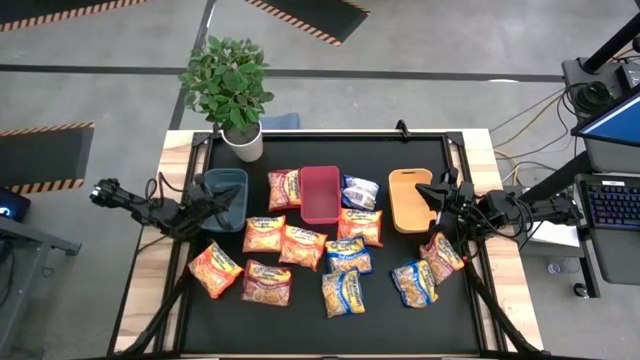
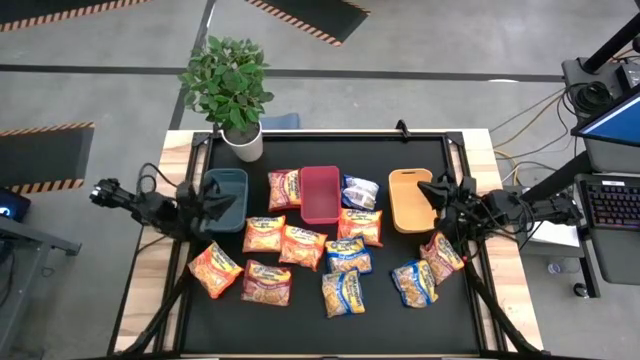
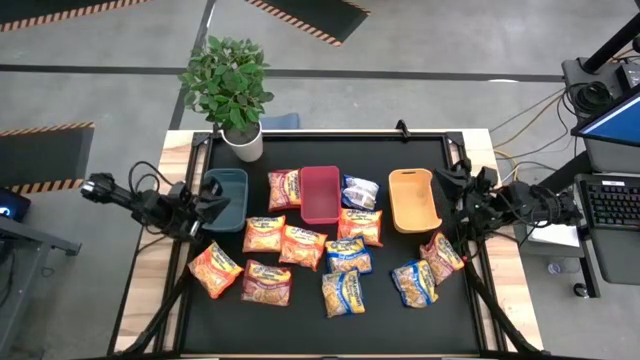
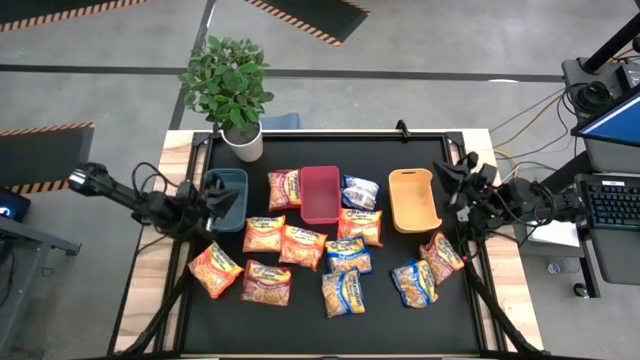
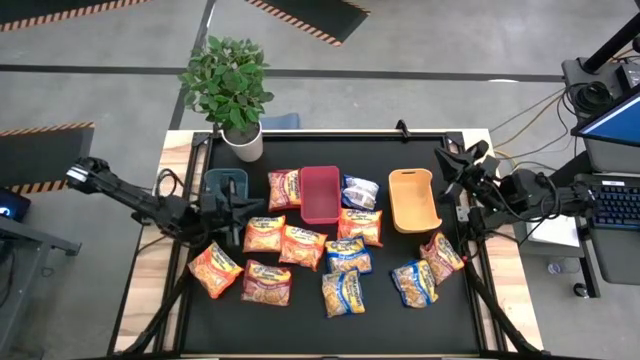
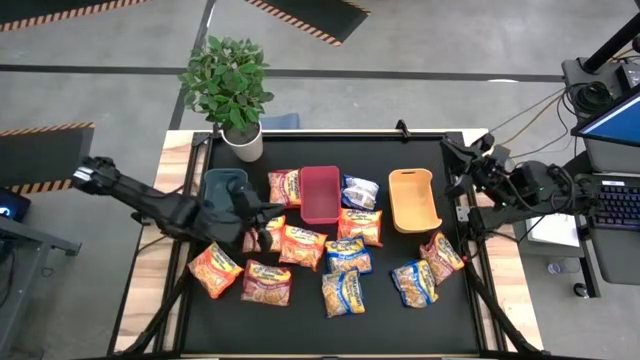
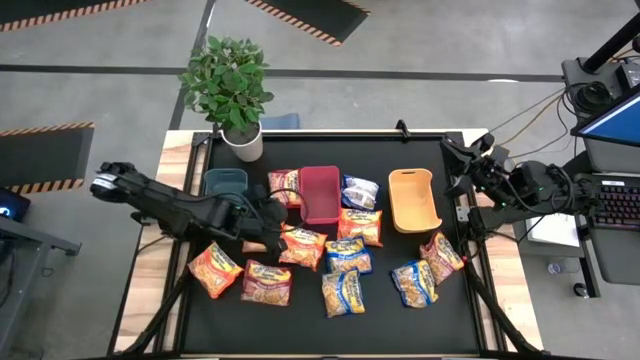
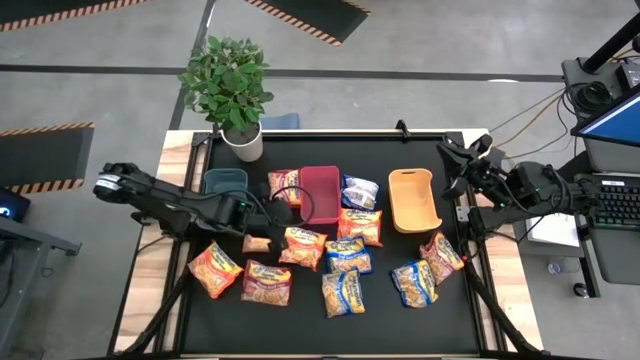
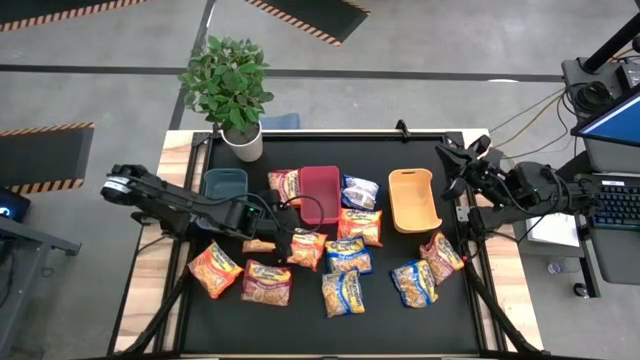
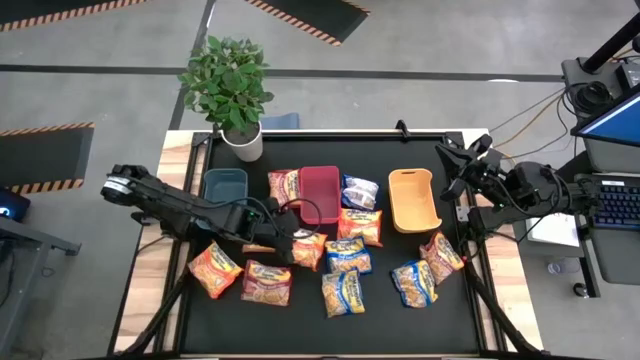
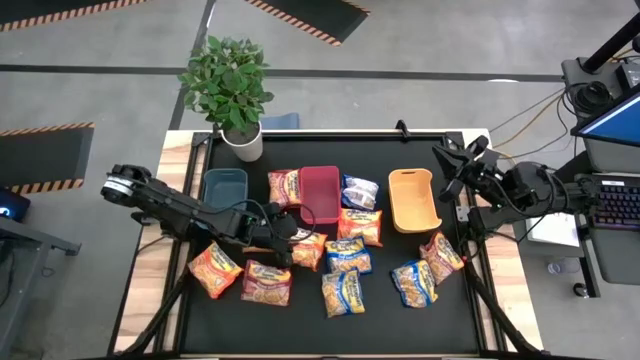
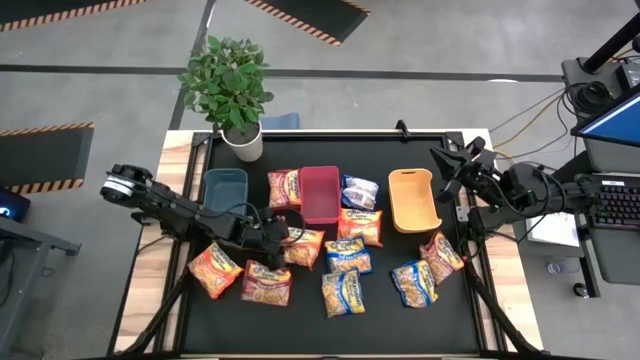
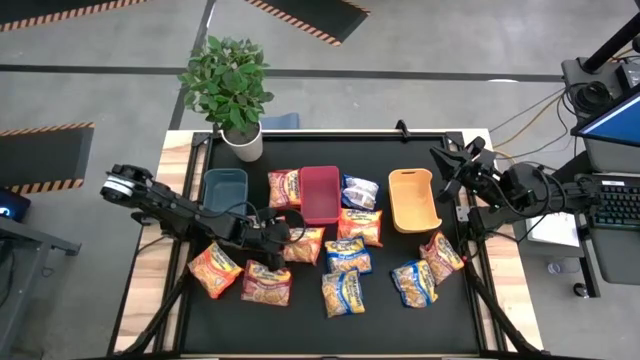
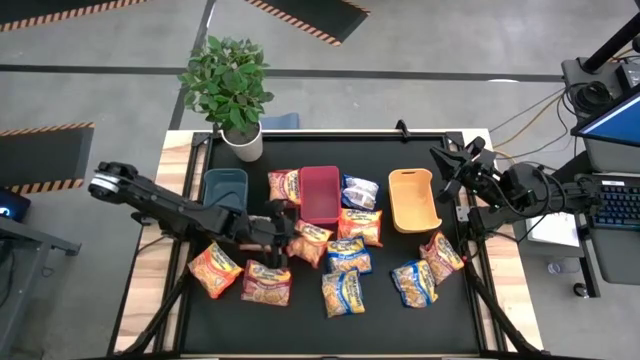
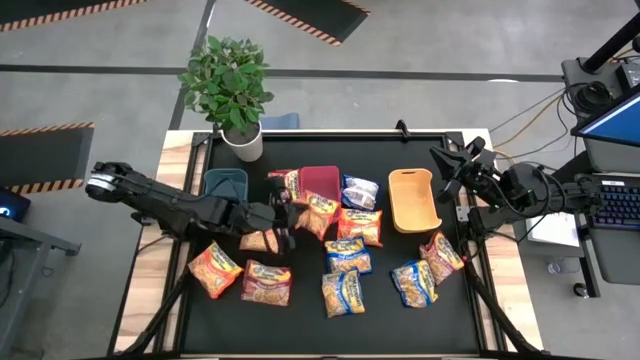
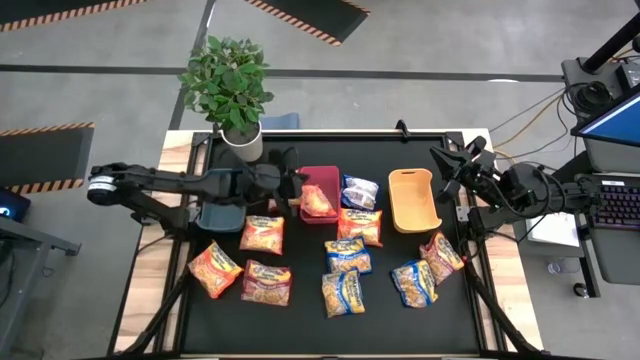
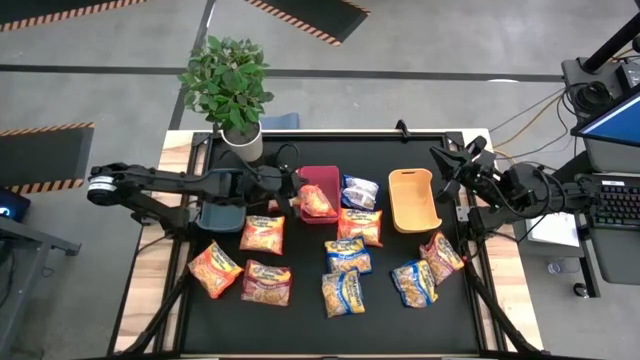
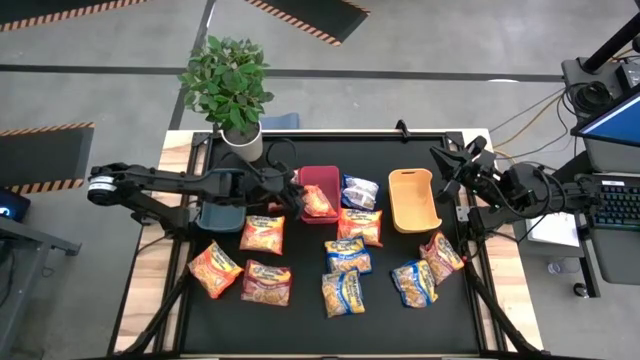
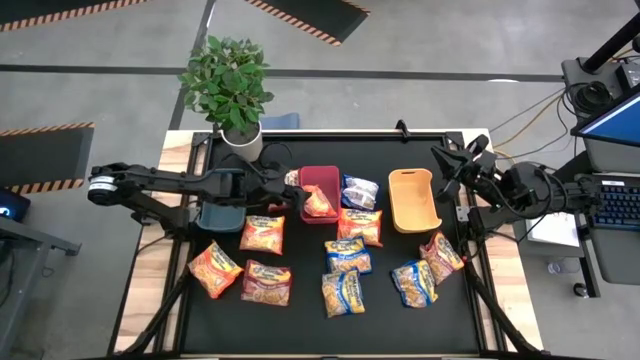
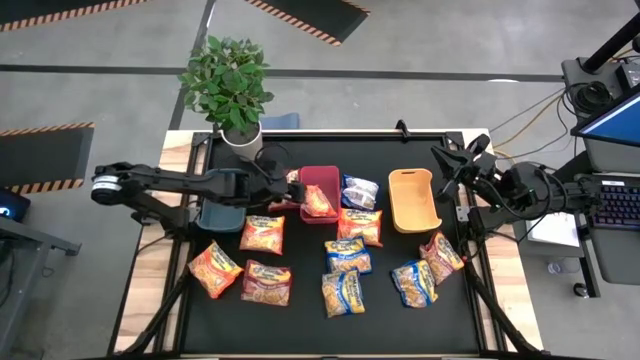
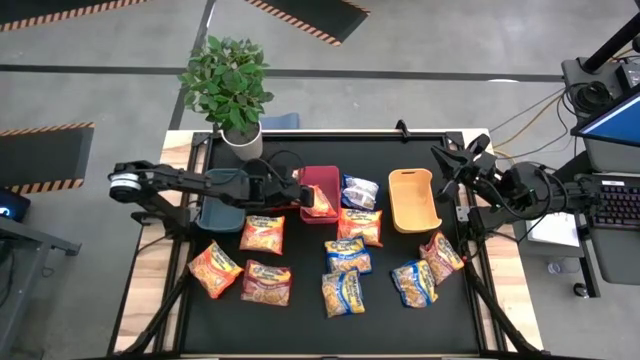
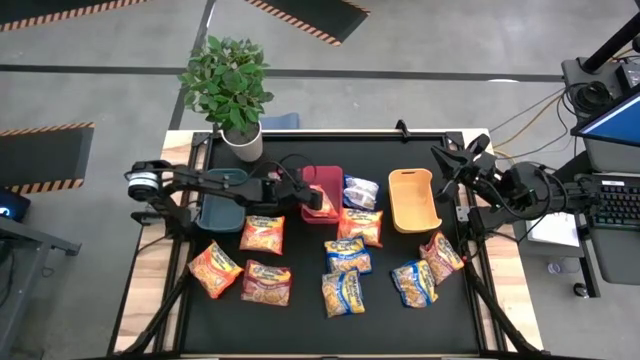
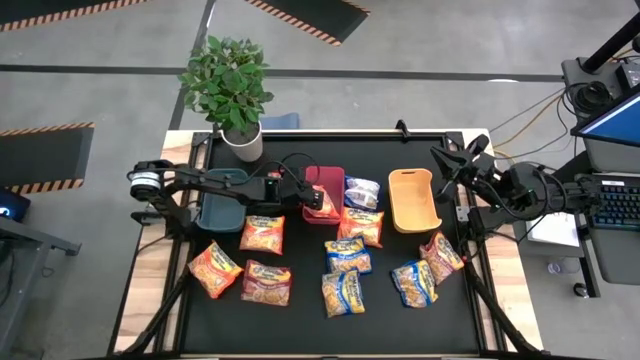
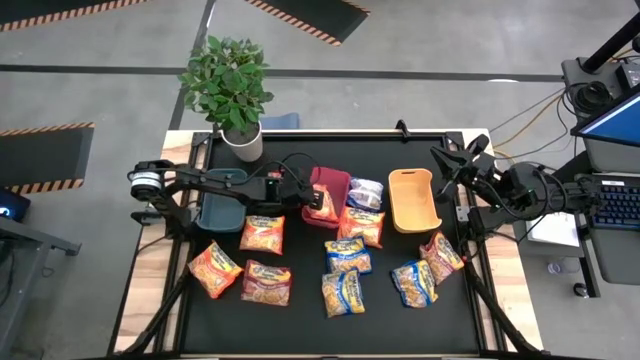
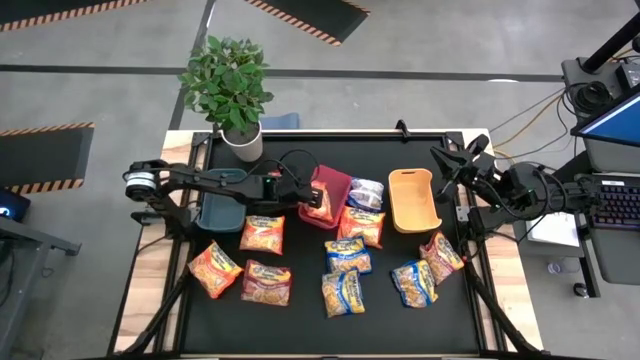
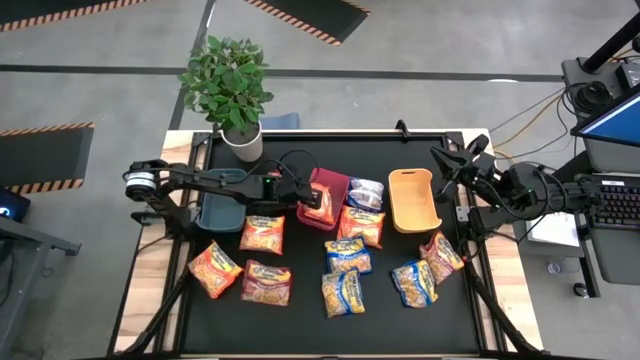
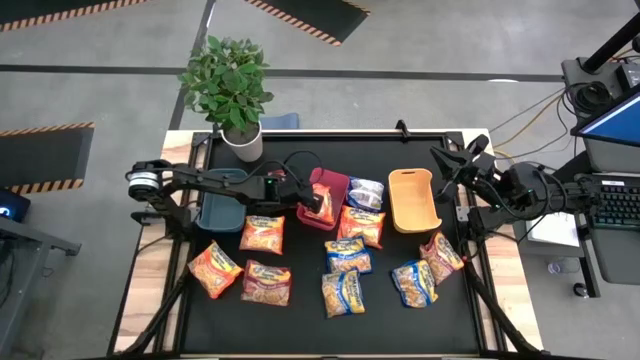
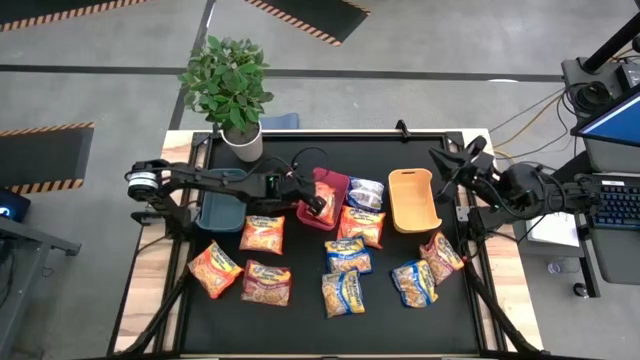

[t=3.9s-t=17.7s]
Task: Sort Maruchan noodles
Put the orange noodle pack into the red bin
